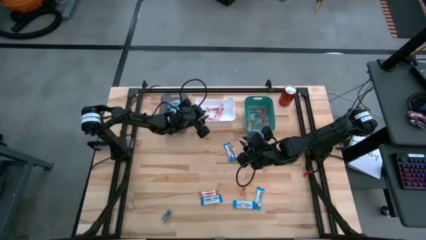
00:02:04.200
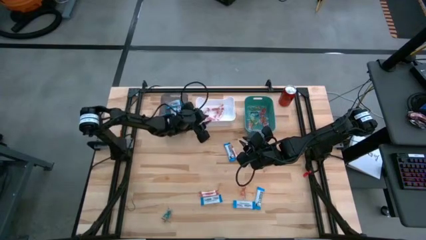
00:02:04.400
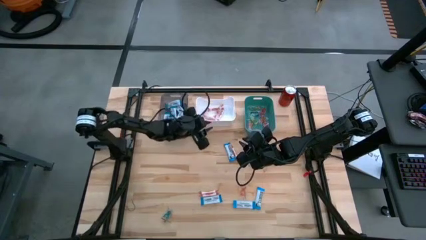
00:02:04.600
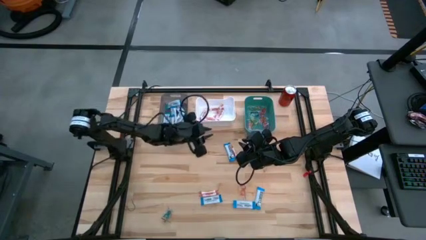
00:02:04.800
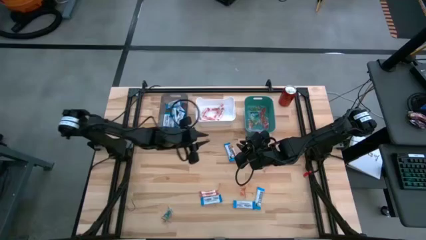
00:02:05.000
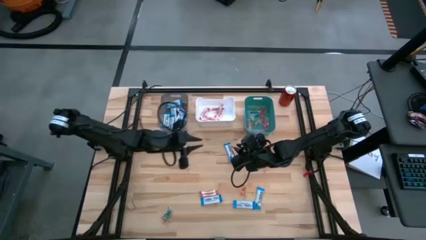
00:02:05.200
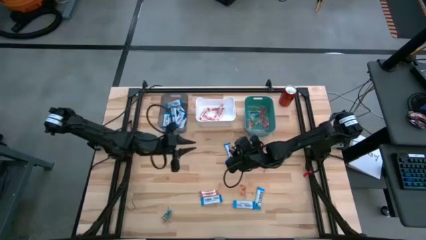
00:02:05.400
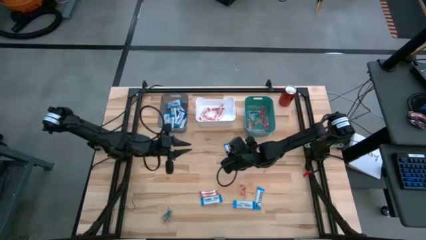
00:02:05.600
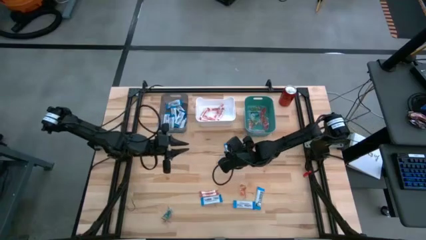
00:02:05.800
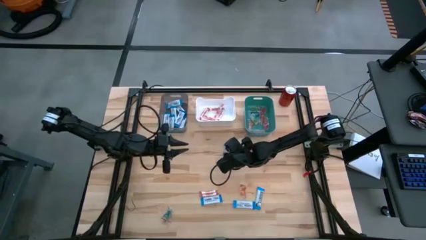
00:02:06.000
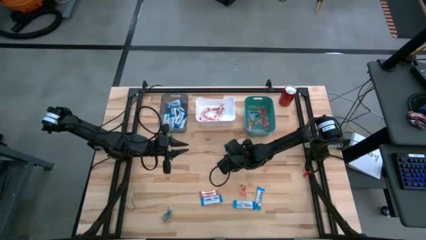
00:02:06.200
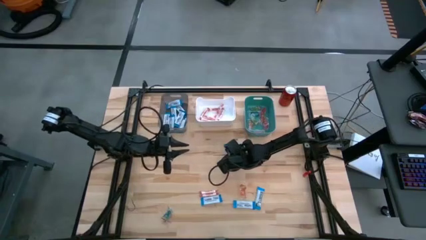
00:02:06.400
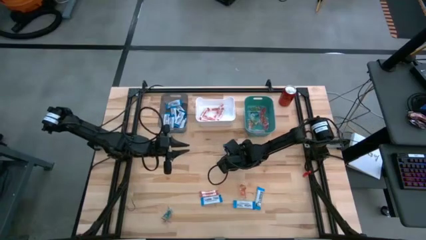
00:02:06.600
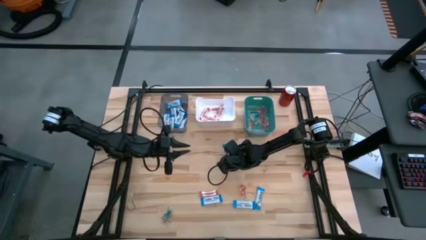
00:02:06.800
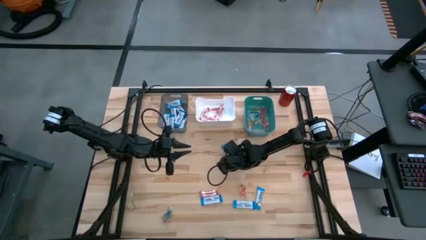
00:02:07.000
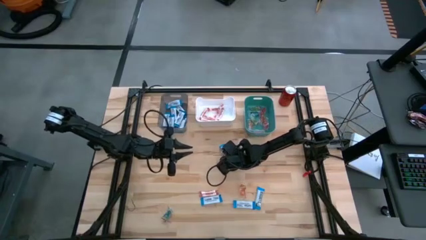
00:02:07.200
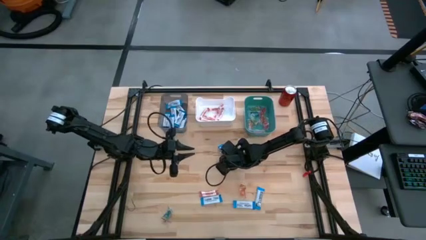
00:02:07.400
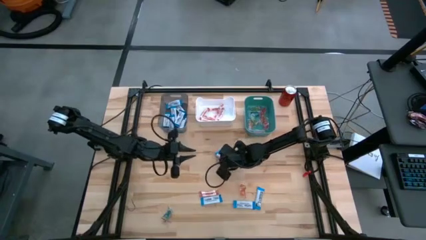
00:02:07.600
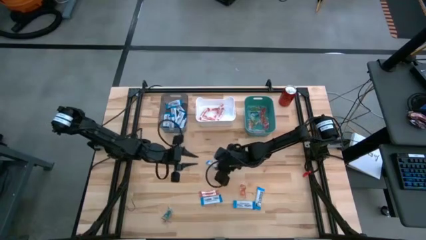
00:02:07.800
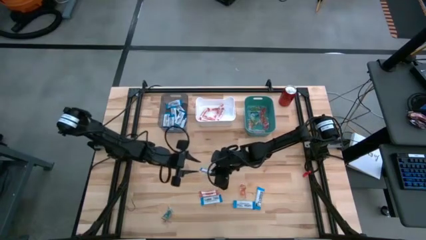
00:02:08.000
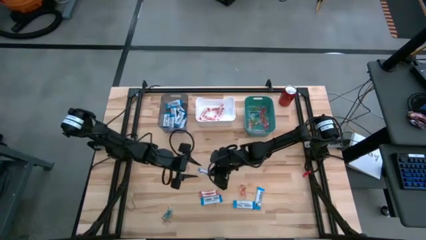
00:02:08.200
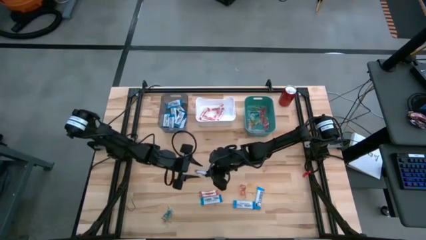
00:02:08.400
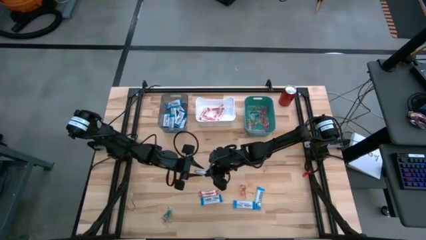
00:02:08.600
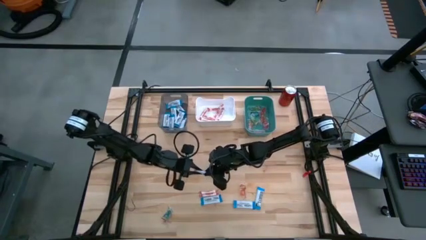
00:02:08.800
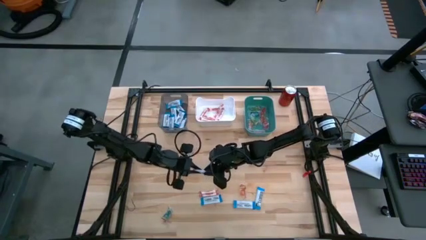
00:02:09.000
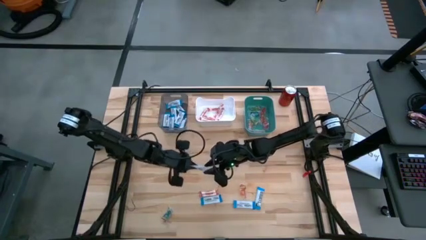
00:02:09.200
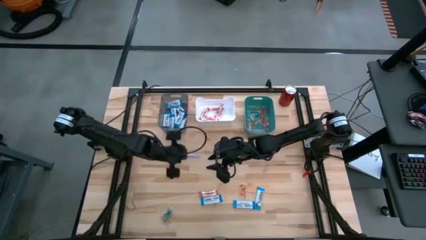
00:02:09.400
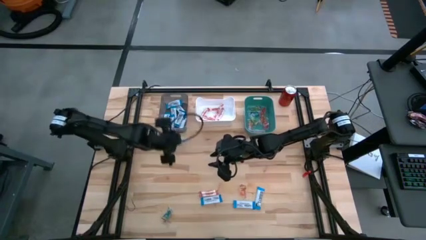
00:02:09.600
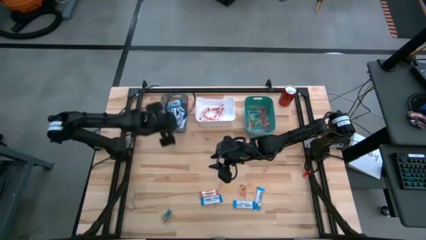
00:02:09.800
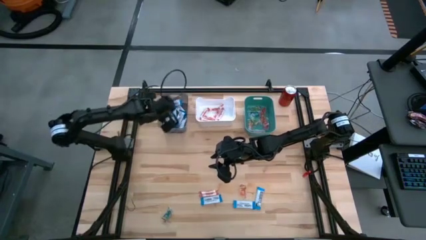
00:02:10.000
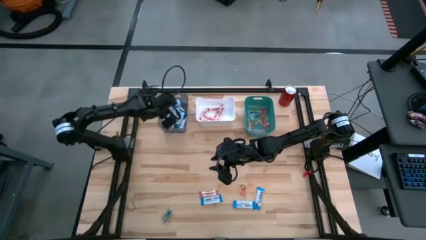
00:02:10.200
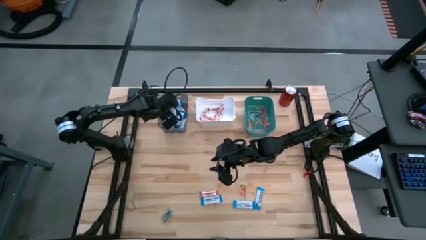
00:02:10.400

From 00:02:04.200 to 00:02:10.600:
Task: Sort candy
Put the white chocolate into the gray bin

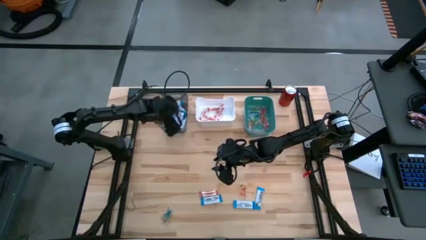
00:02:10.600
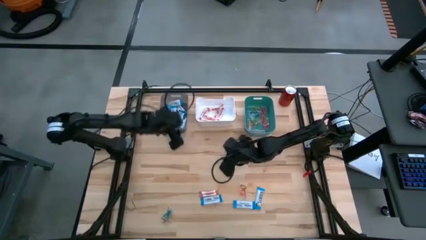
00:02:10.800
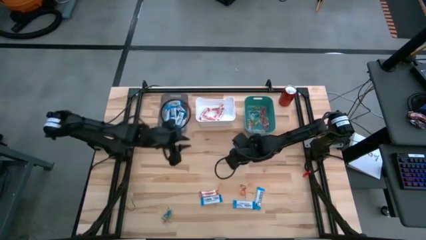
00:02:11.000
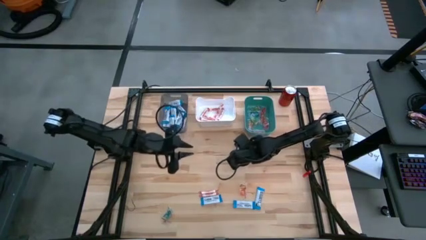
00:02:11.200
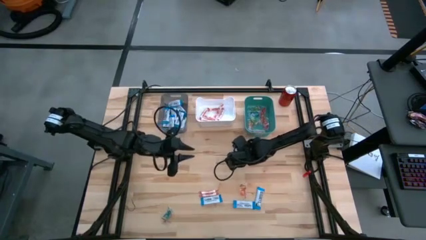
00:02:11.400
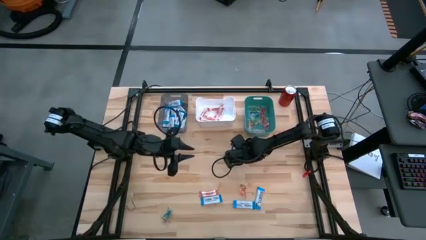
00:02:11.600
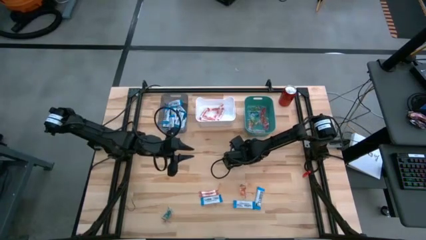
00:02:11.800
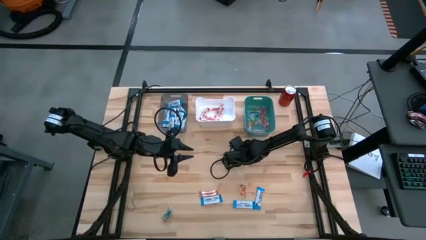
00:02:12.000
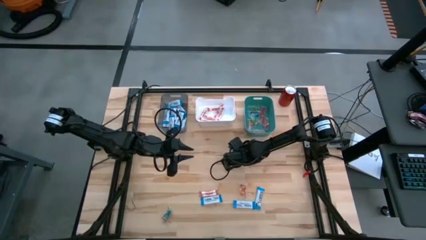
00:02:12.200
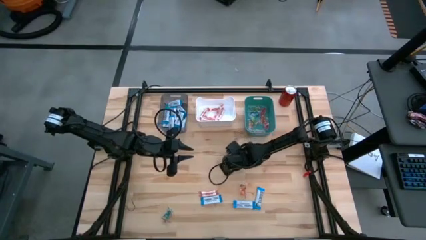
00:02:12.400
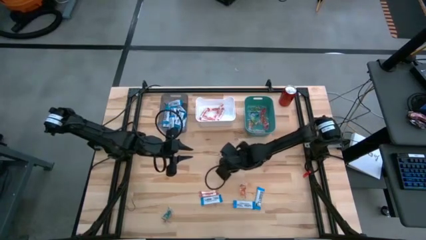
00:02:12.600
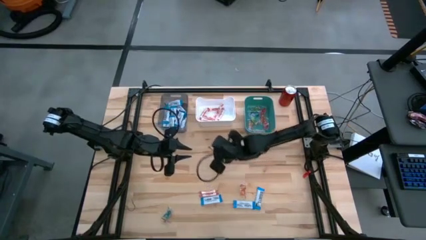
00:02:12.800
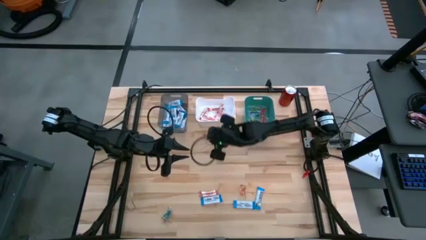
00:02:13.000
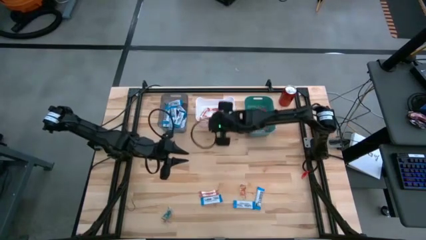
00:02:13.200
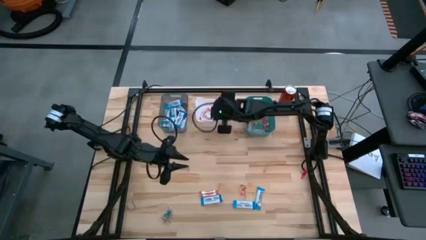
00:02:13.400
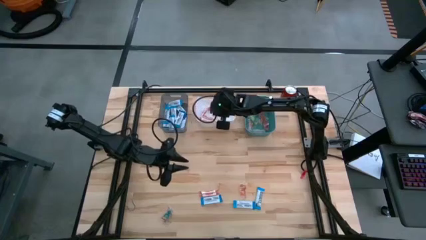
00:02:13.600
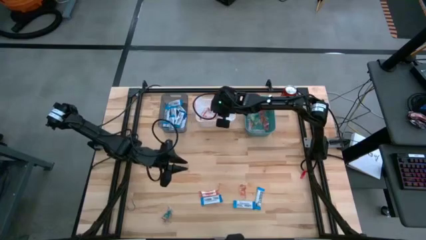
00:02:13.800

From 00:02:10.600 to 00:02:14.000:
Put the orange candy into the white bin

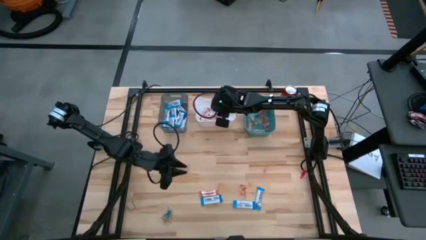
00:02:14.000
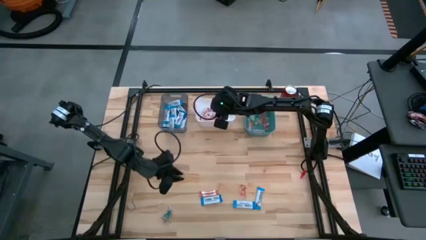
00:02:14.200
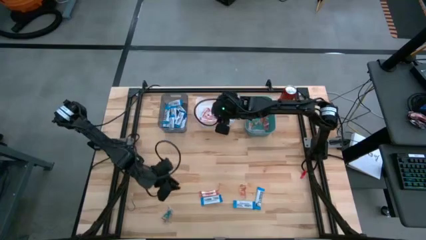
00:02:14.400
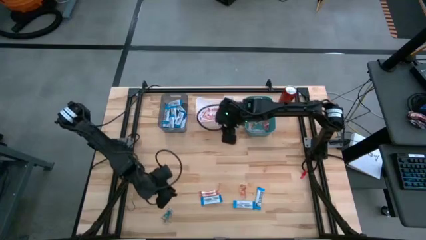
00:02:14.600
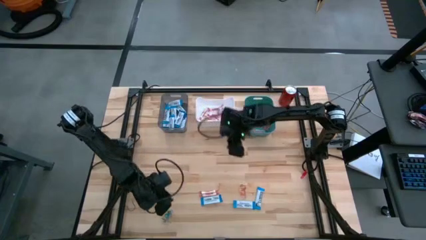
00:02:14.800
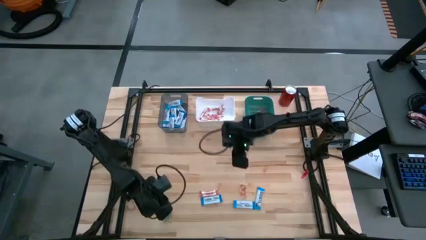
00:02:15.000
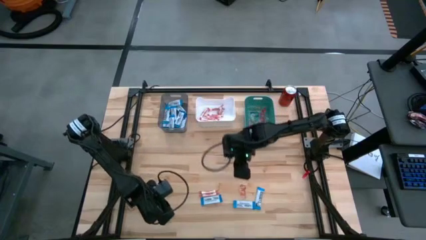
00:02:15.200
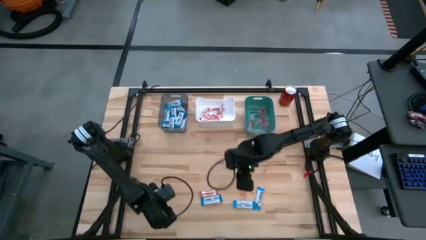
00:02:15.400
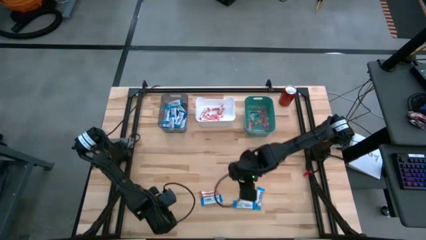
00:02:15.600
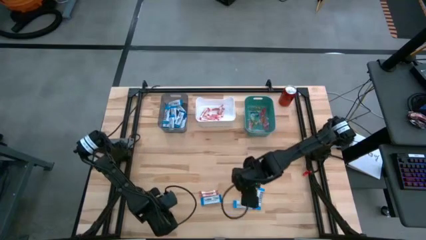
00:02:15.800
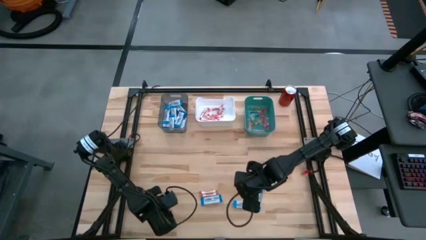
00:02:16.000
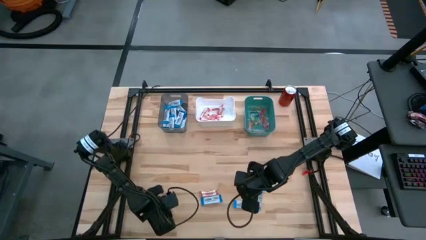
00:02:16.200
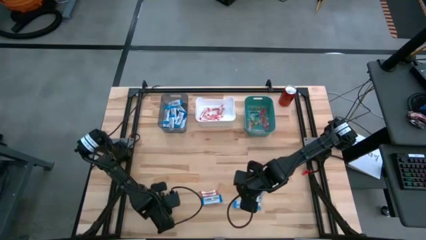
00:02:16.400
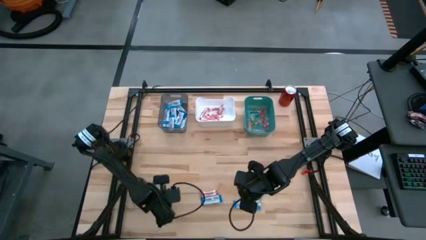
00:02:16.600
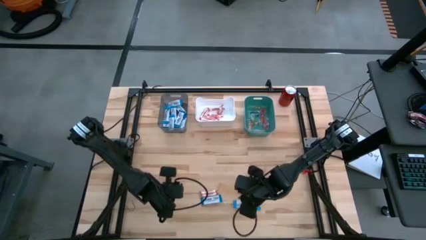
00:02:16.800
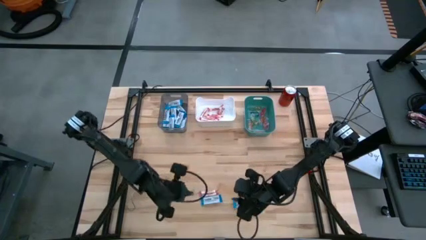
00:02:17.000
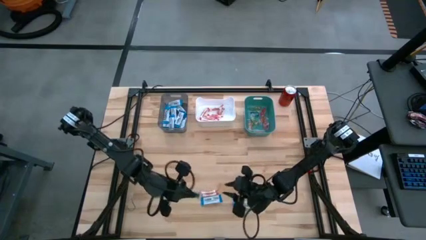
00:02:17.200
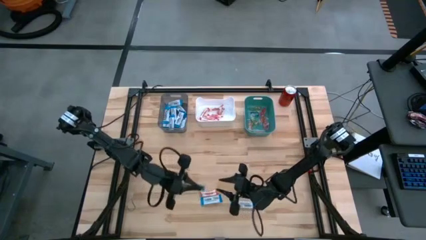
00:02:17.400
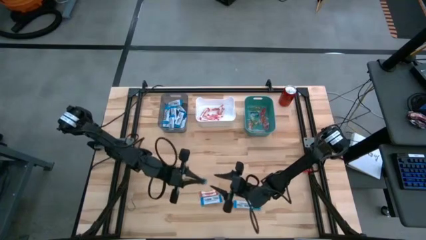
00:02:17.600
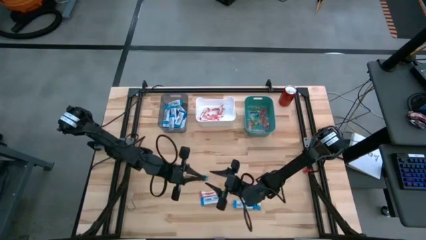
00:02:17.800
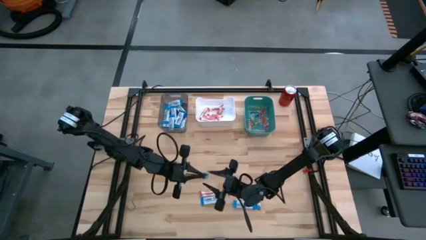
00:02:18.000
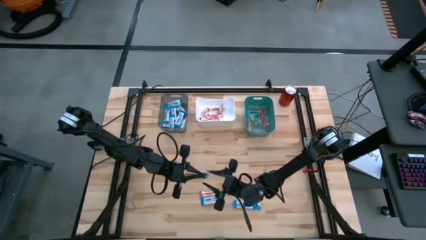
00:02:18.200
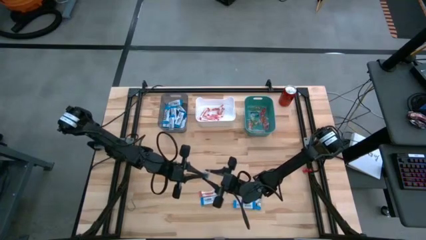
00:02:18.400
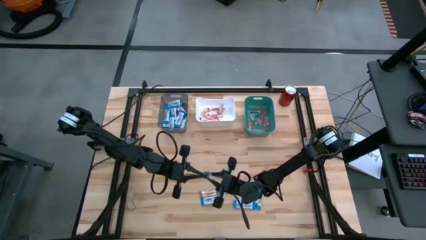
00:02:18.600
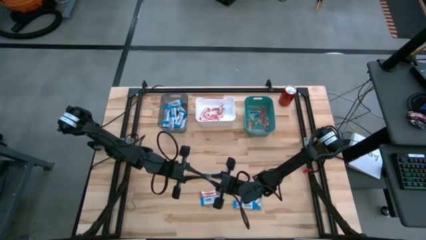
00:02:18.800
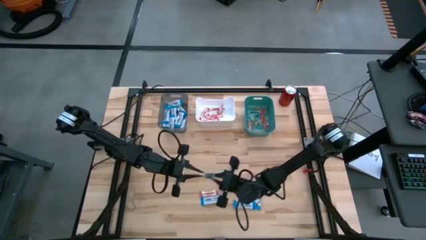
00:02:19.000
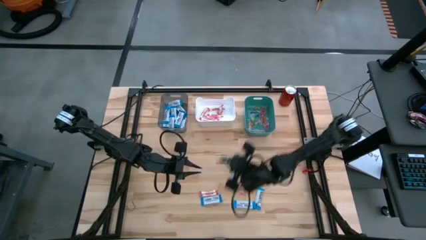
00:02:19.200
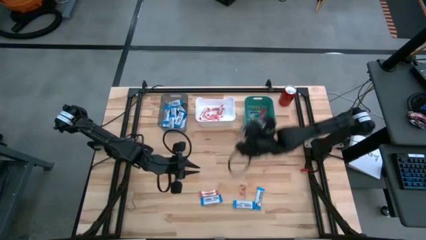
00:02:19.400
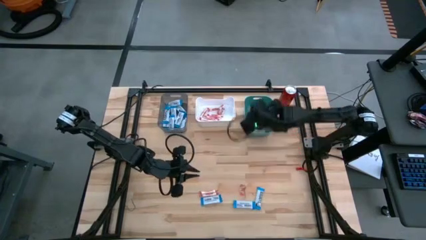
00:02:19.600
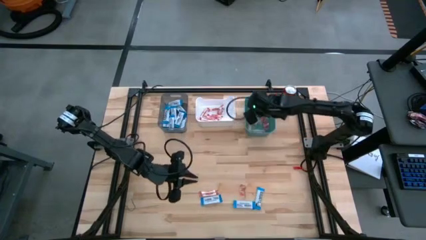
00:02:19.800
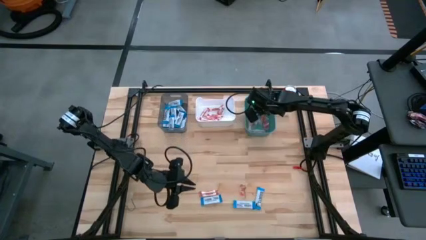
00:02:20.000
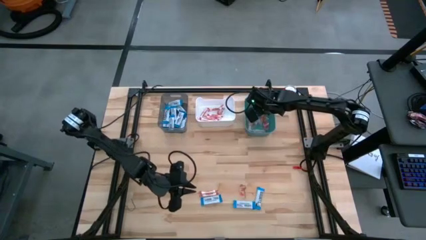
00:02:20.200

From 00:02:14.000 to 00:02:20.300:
Put the transparent candy into the green bin
